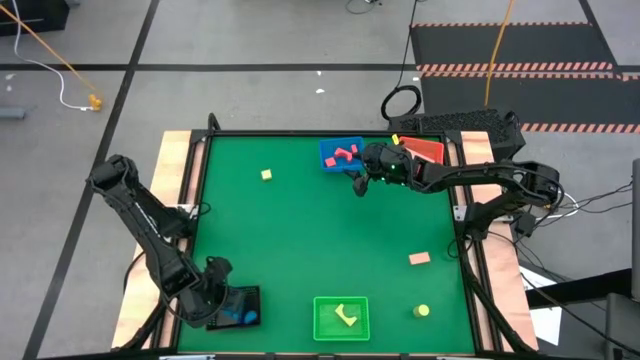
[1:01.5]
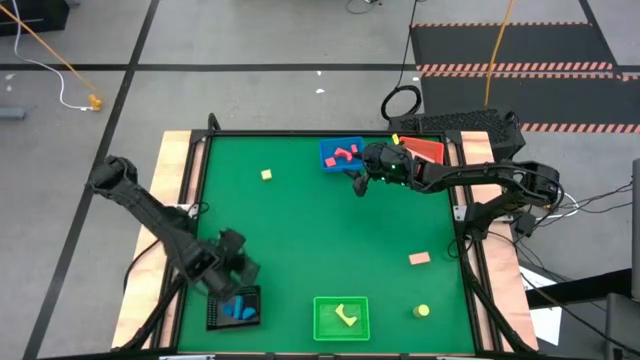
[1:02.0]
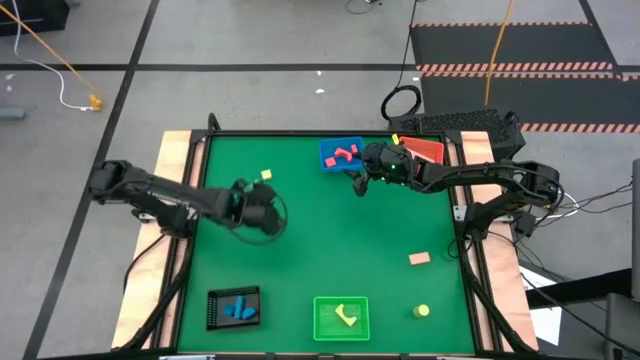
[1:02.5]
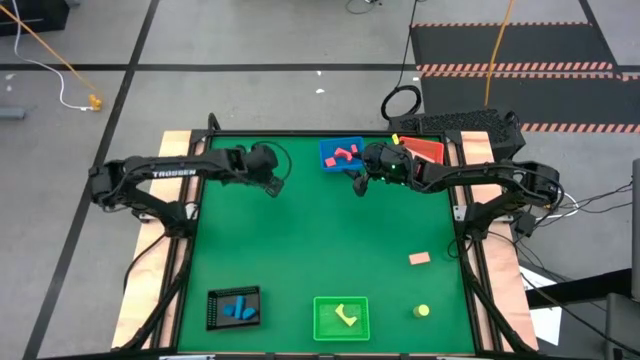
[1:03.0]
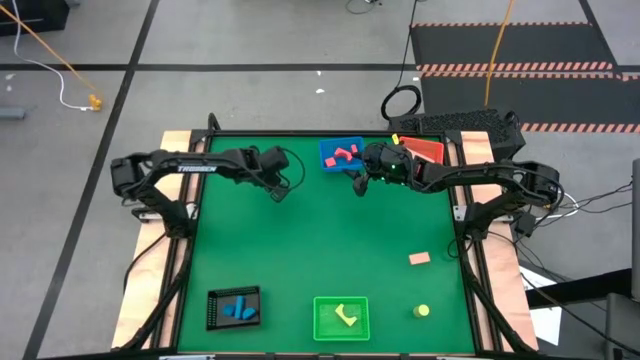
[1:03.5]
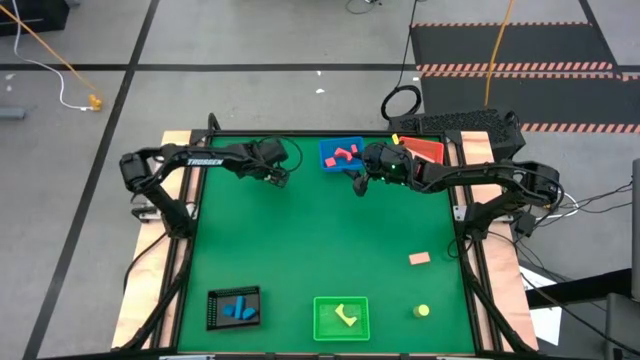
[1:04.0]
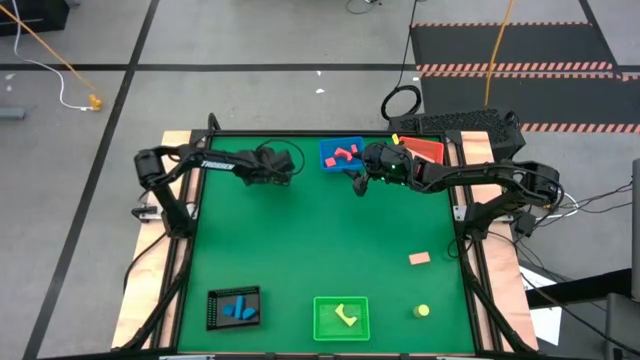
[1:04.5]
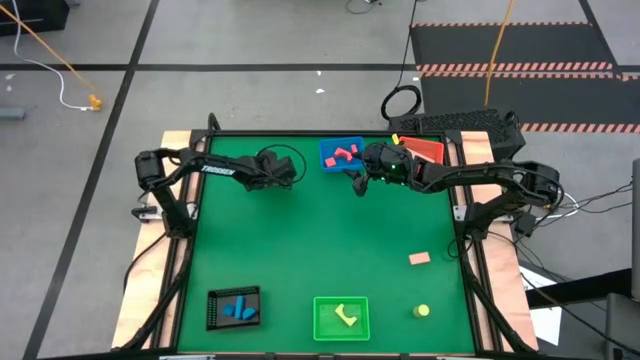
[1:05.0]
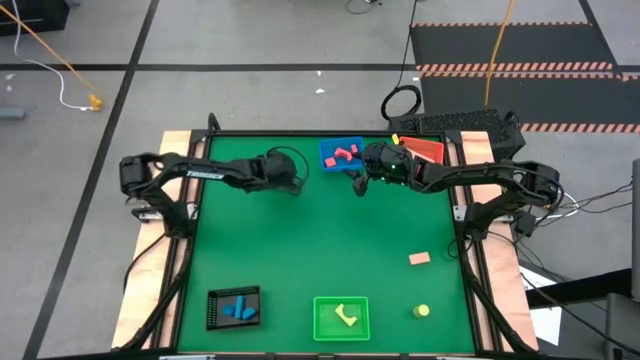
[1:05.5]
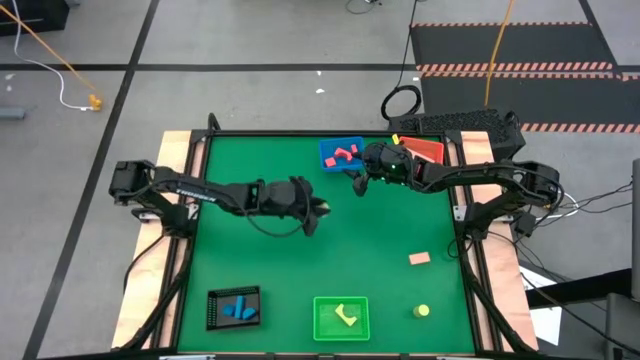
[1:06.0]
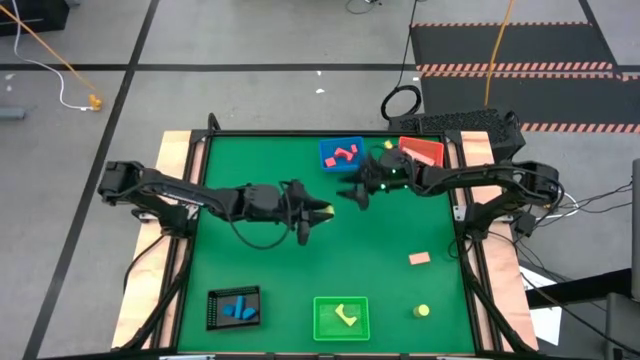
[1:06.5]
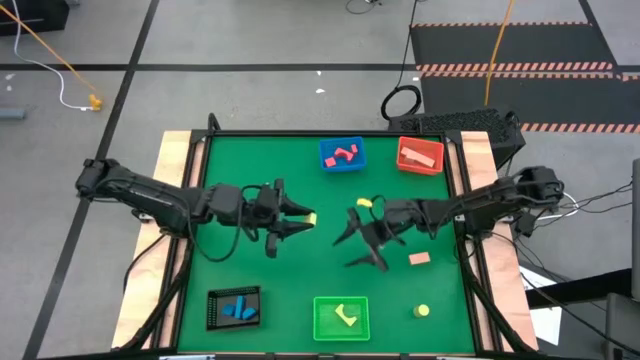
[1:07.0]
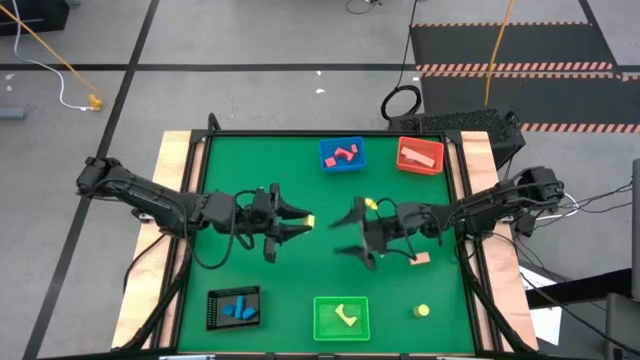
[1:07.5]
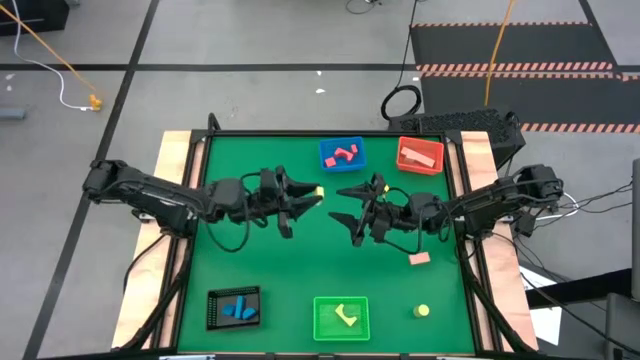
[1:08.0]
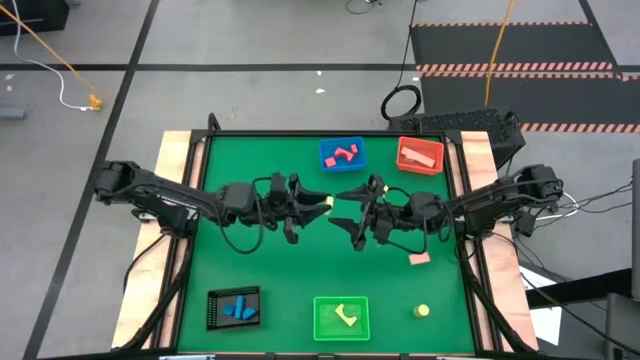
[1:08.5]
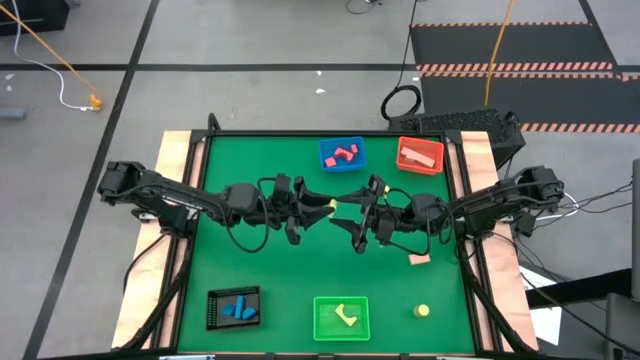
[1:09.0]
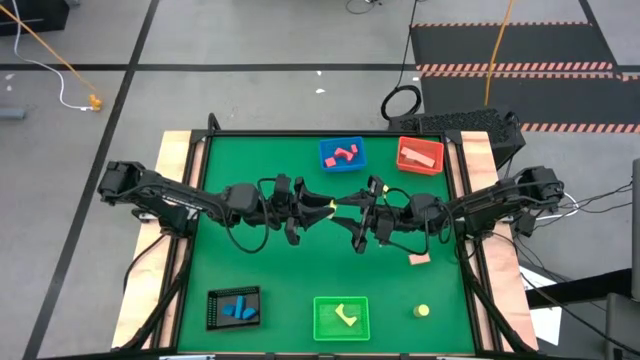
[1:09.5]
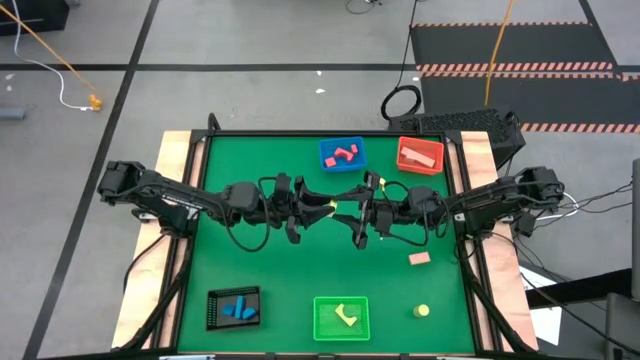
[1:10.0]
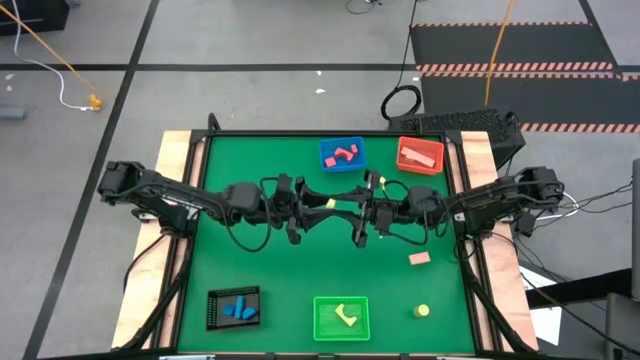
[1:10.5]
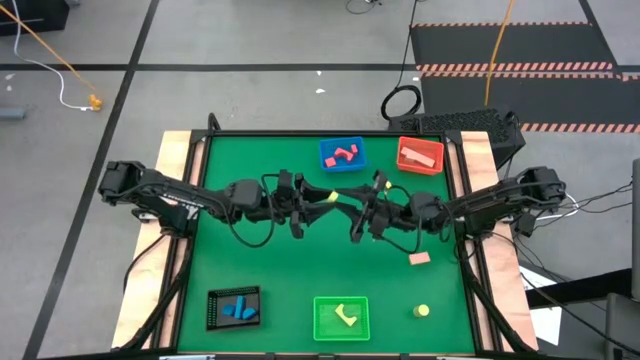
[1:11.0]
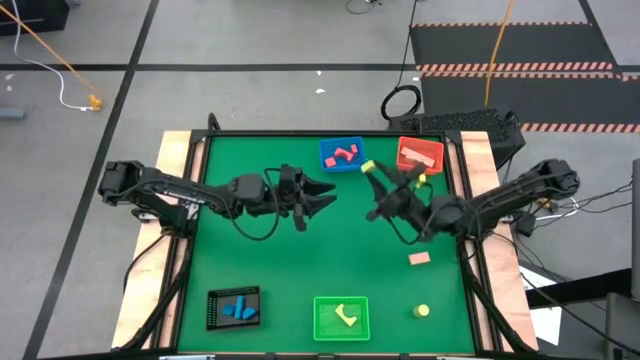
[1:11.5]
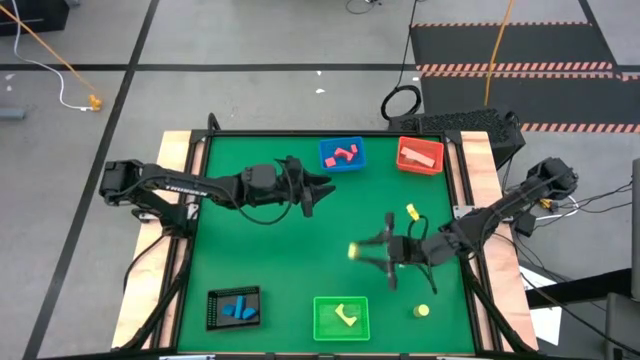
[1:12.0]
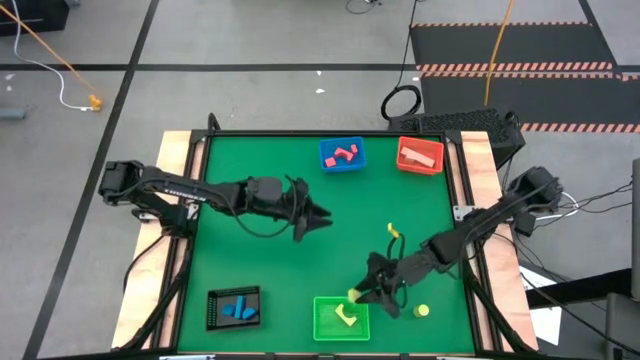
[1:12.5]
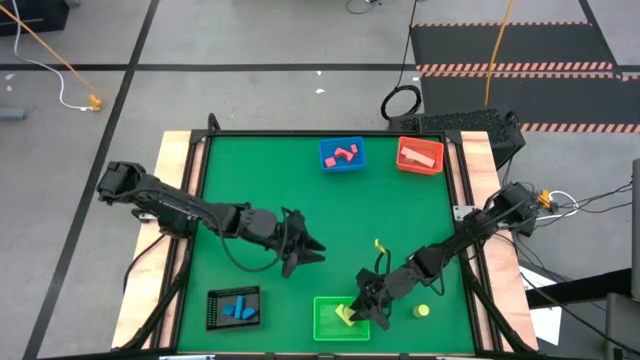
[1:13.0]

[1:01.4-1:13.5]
Task: Sort & place blocks by color
Put the green block into the green bin

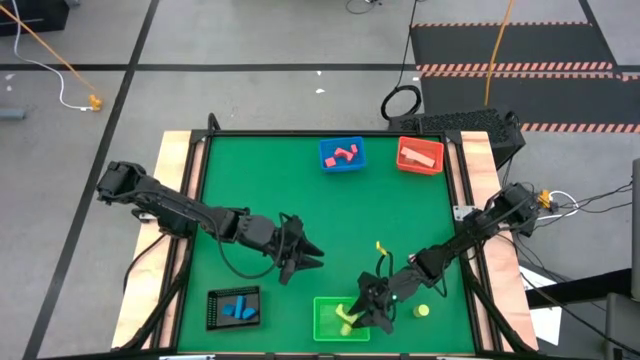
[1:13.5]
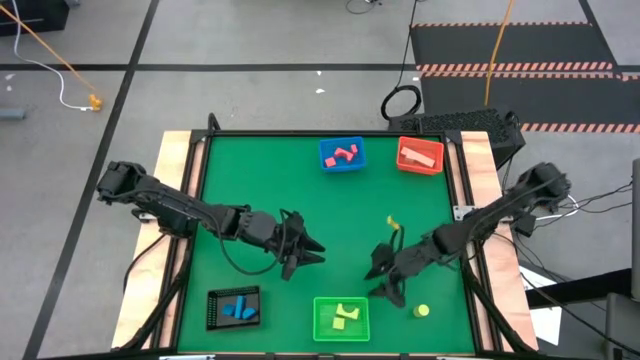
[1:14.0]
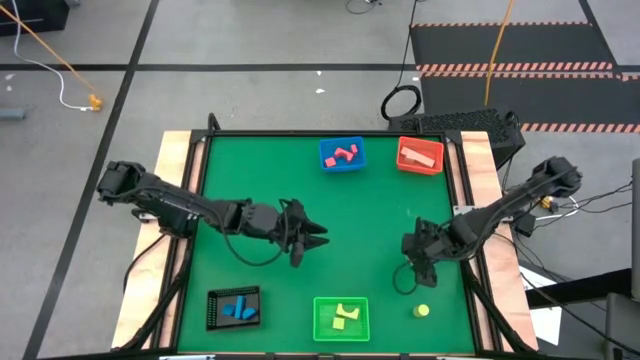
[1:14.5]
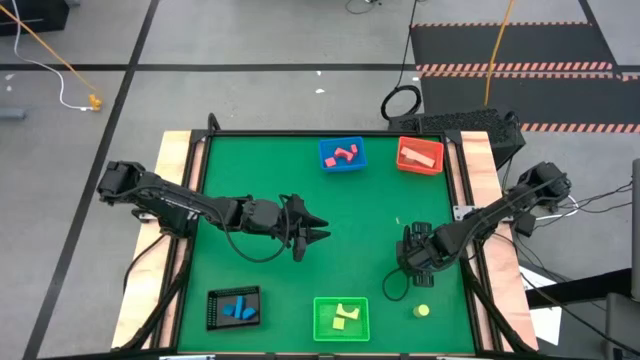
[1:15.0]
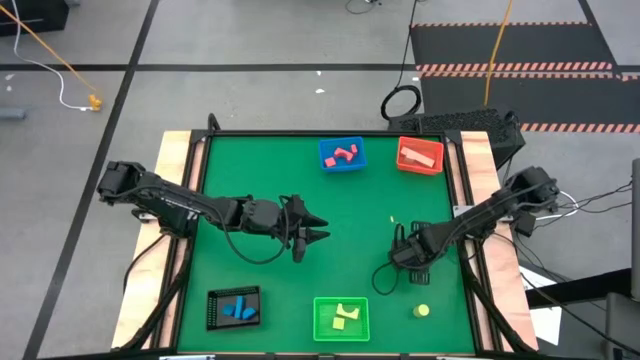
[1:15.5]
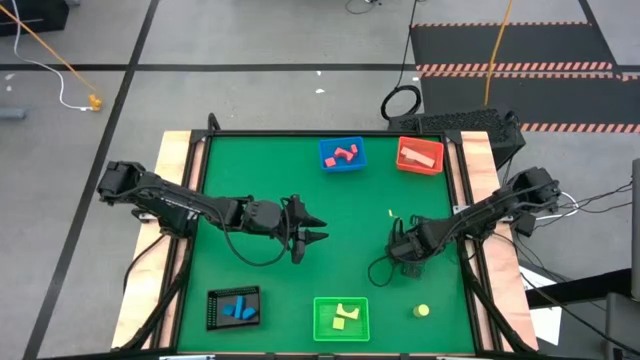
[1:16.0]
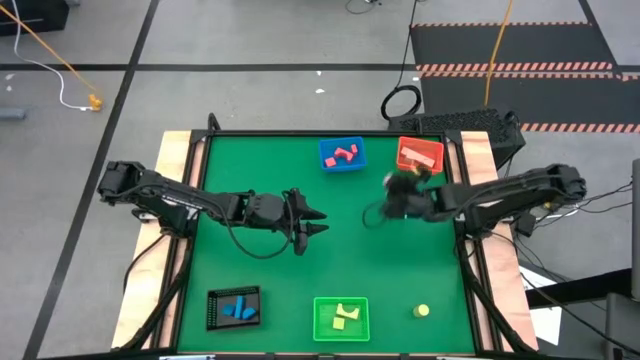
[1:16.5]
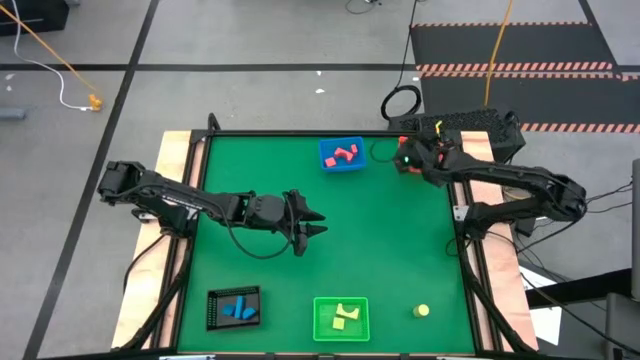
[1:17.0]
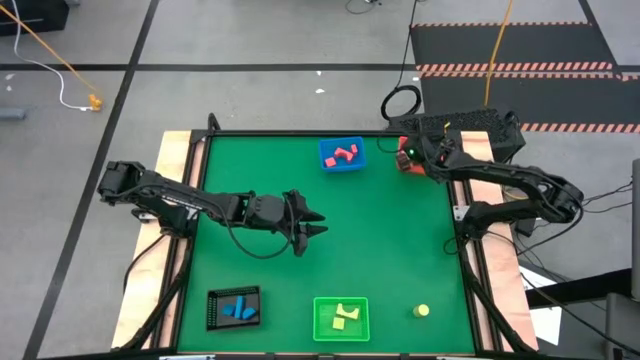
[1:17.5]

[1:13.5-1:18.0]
Put the brown block into the orange bin

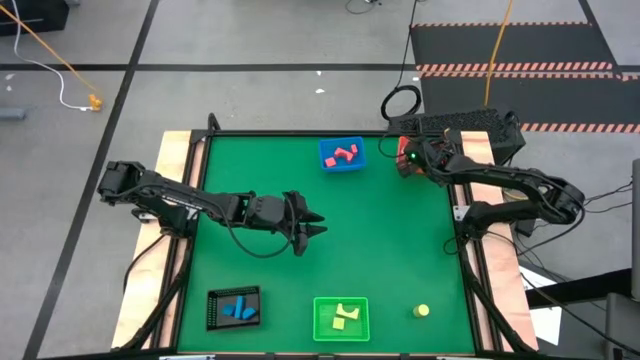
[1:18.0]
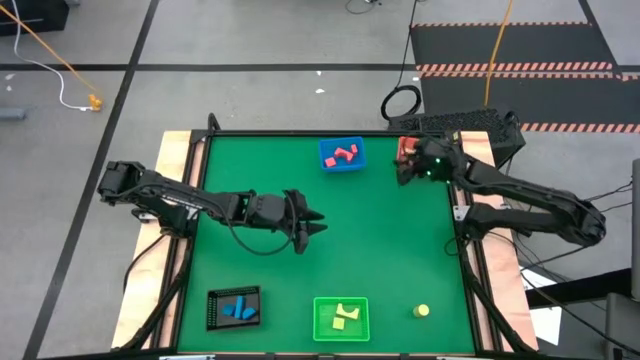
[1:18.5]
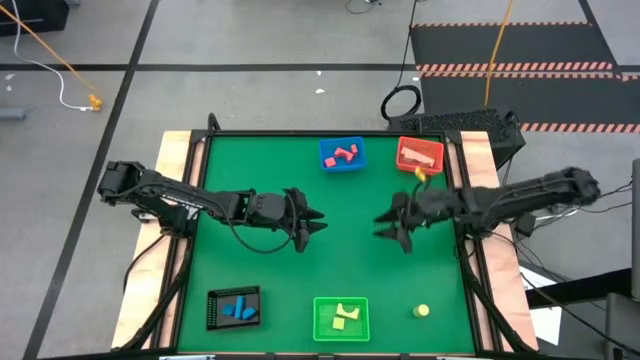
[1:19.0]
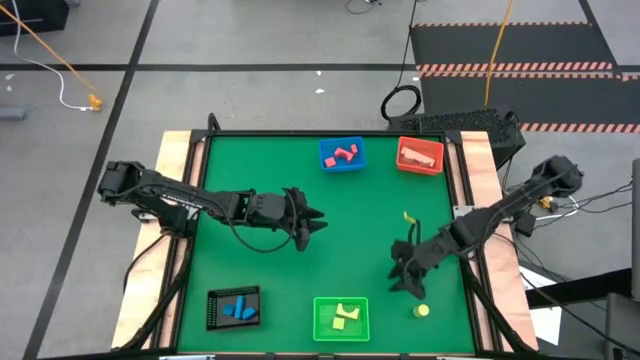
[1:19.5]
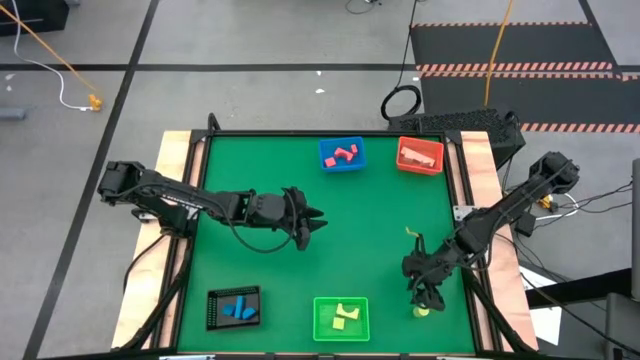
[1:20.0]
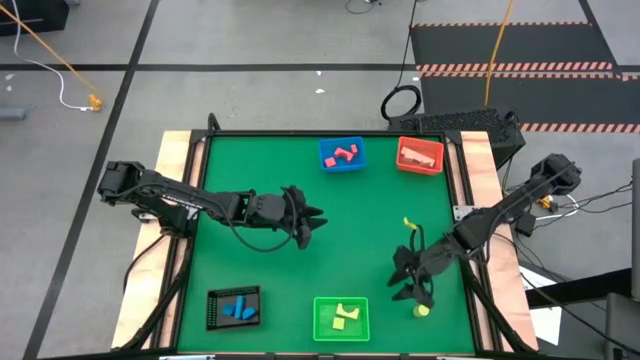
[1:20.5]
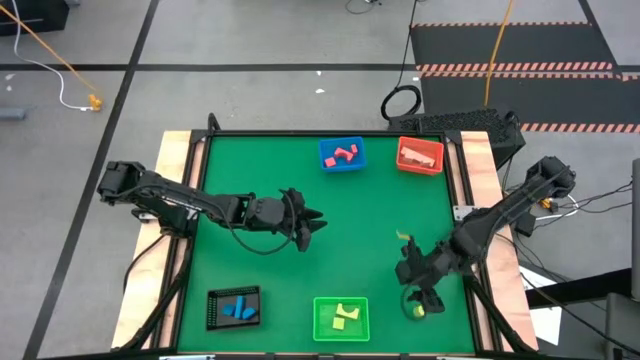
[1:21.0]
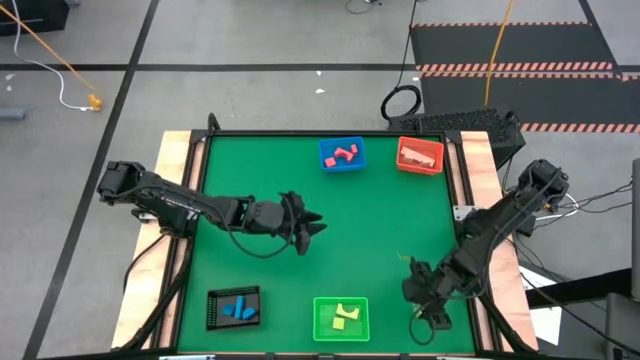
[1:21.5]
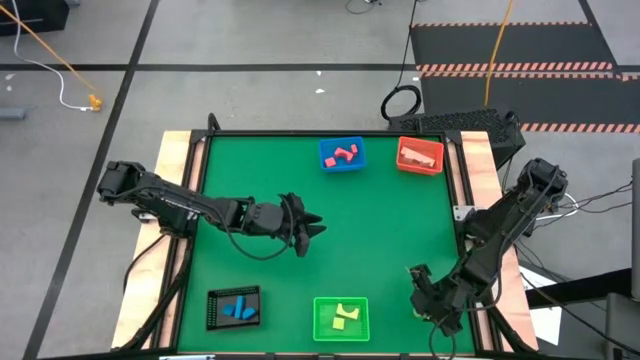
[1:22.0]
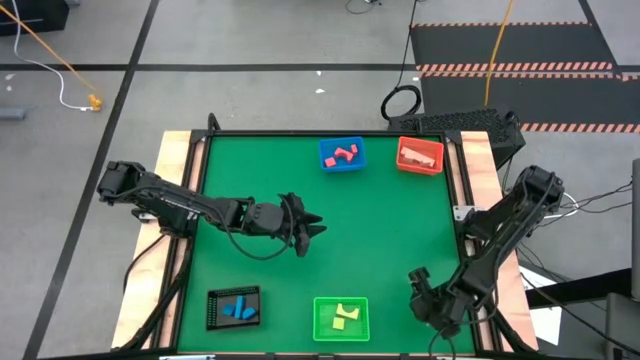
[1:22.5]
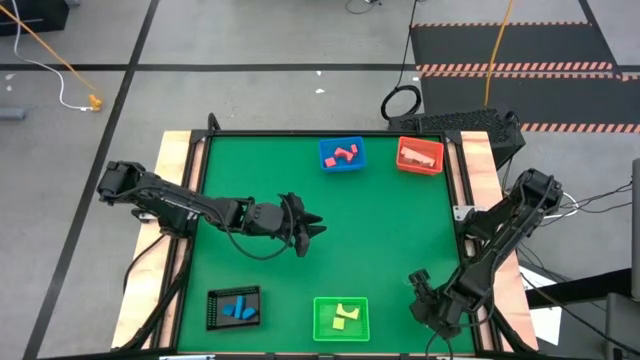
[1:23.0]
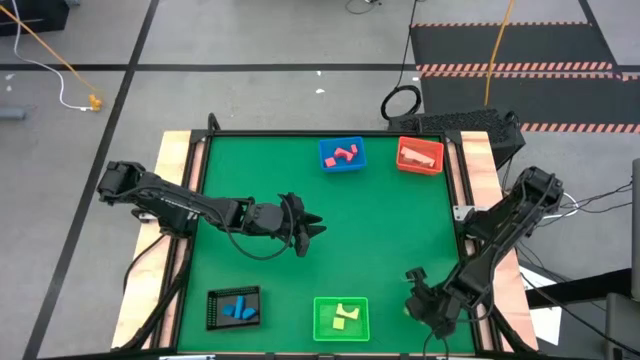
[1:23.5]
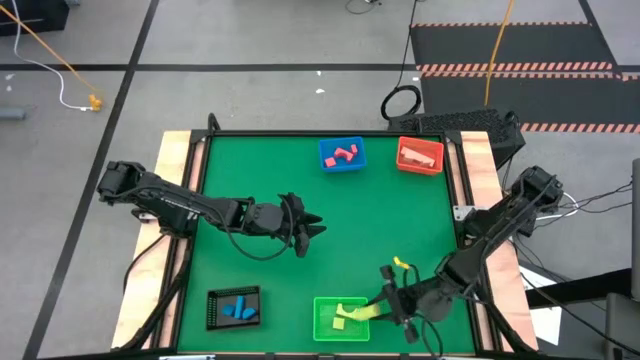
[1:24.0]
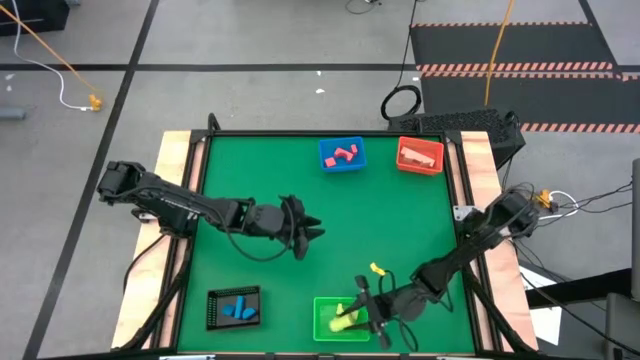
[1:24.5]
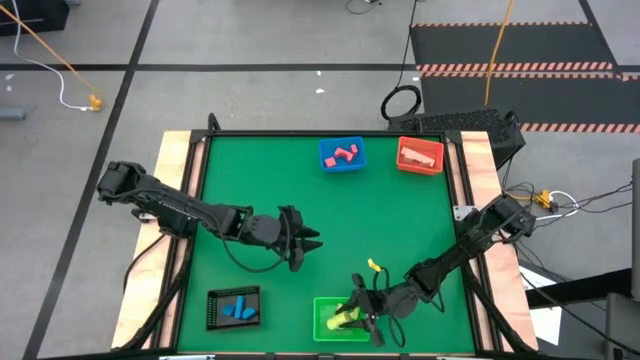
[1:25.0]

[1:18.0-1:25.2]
Put the green block into the green bin
